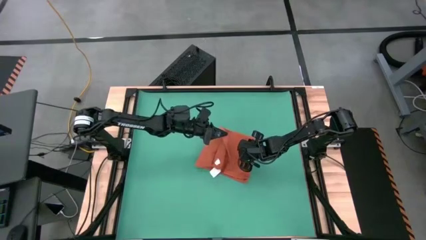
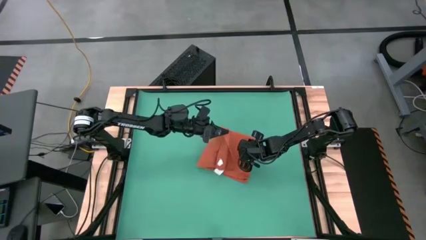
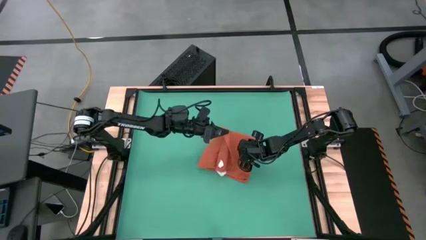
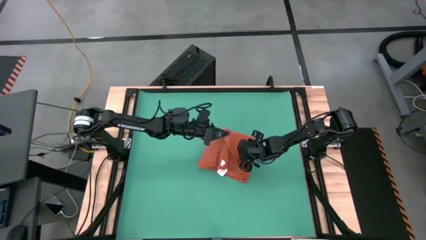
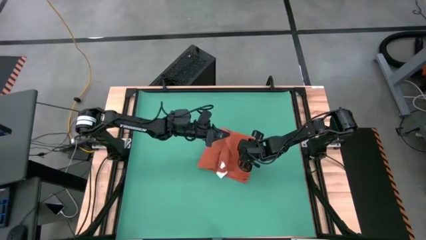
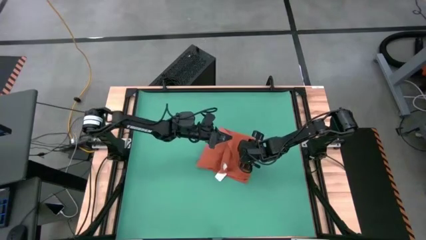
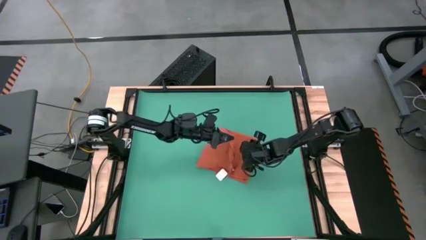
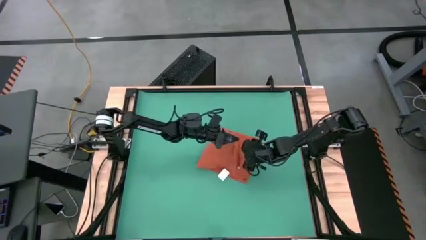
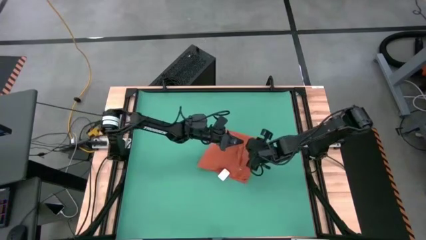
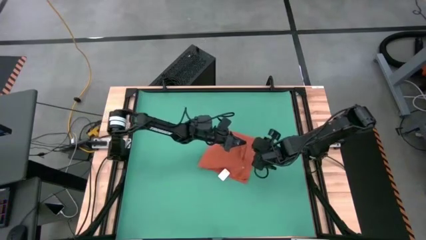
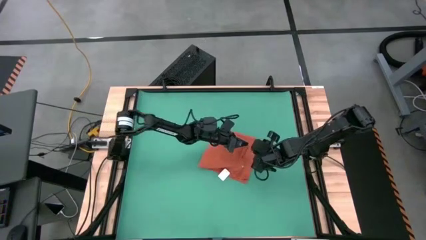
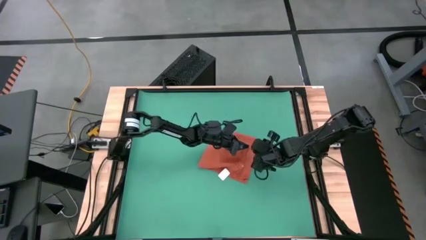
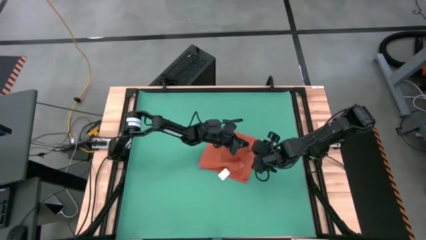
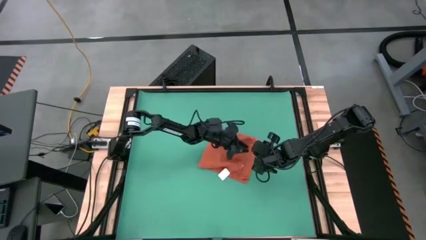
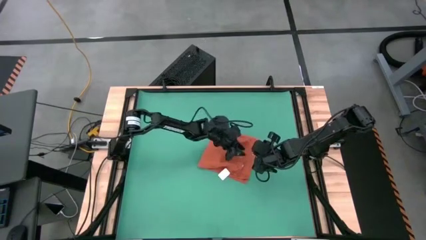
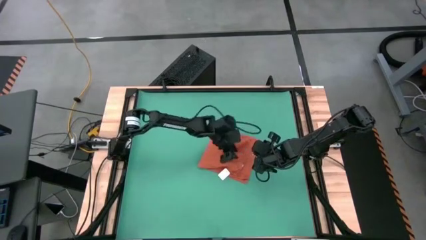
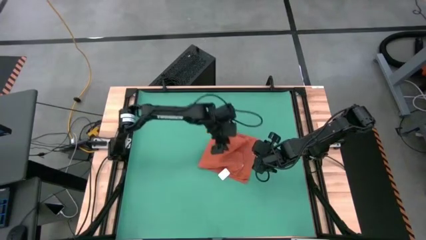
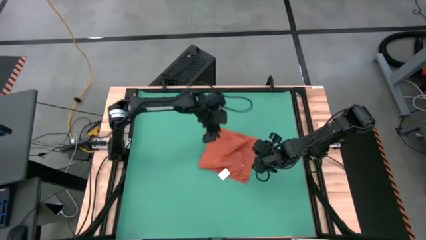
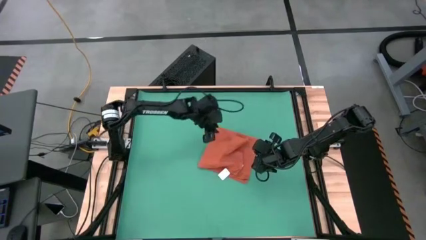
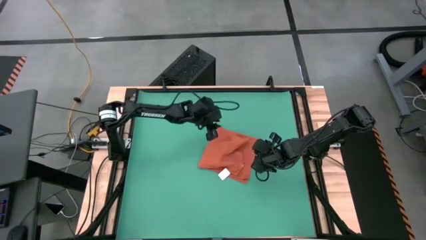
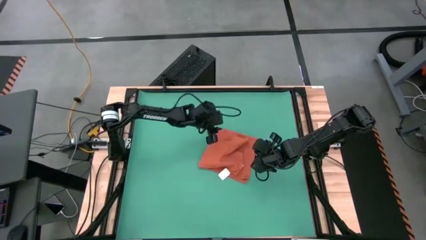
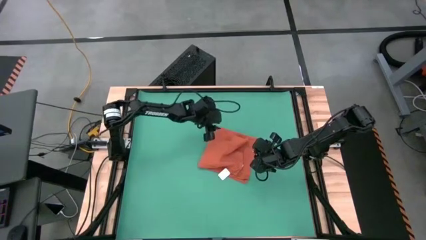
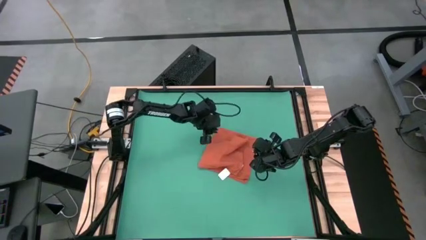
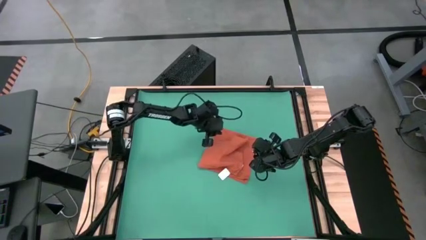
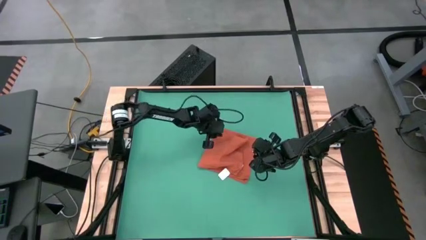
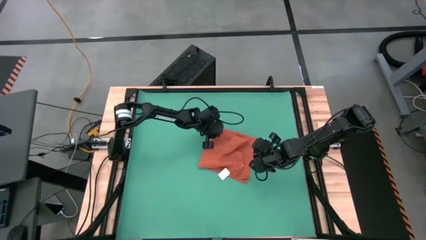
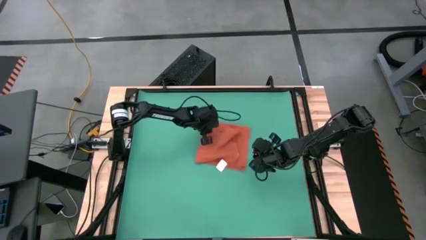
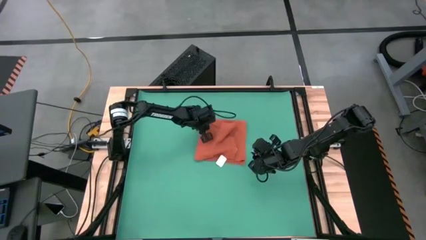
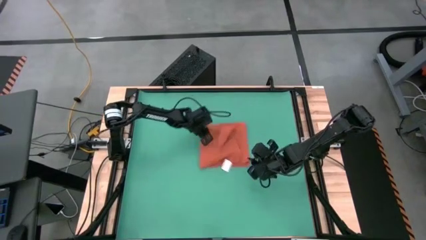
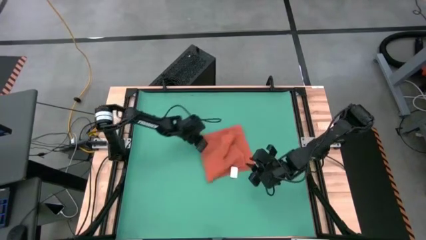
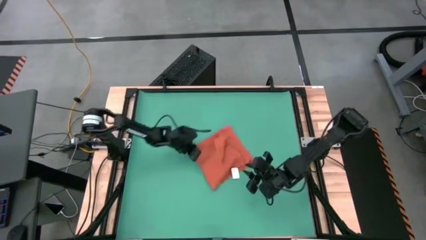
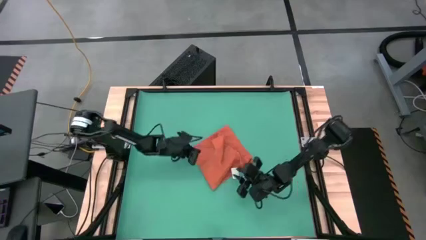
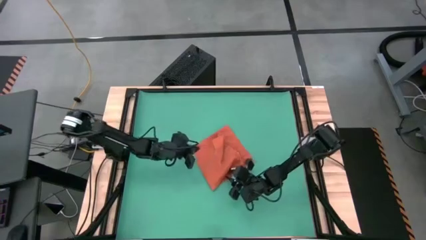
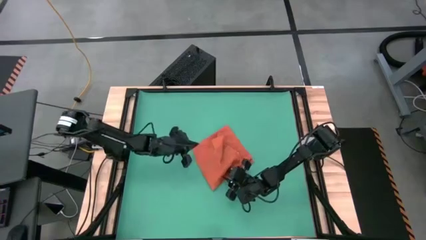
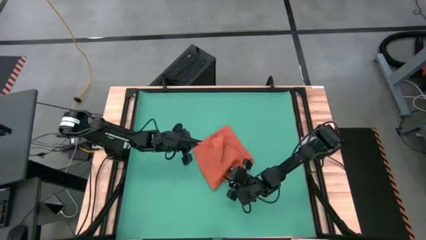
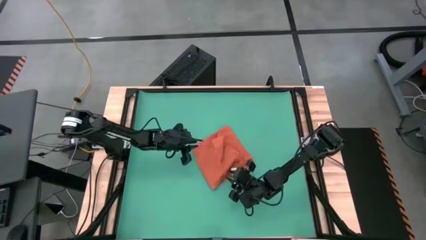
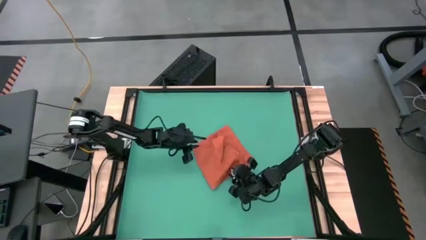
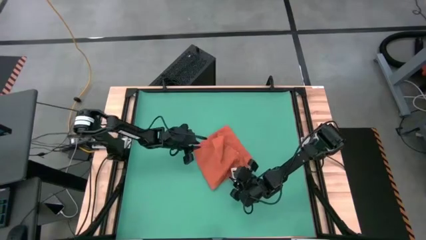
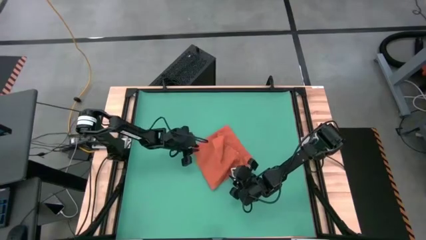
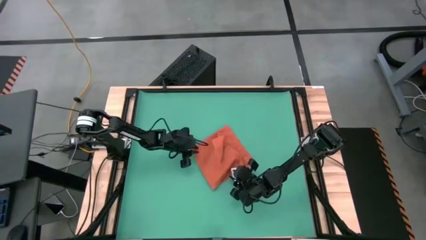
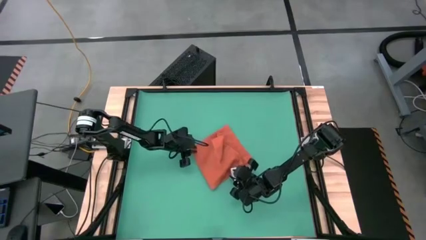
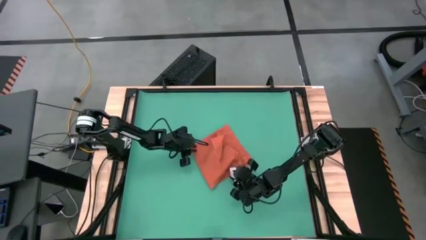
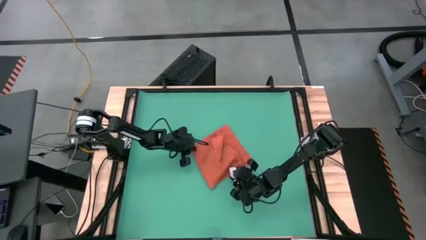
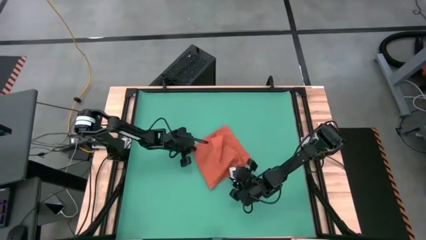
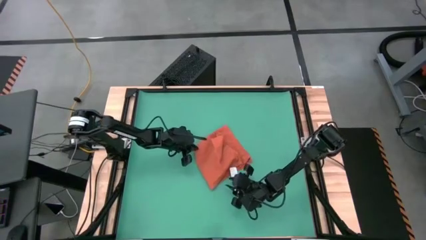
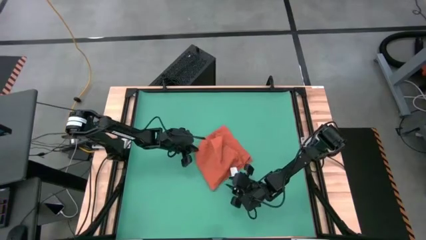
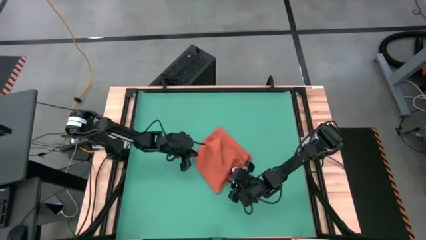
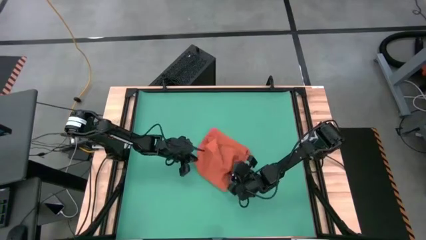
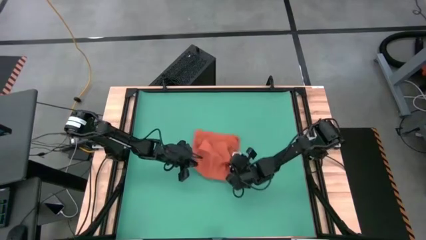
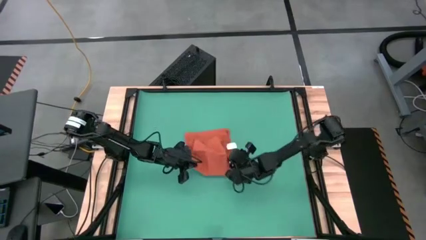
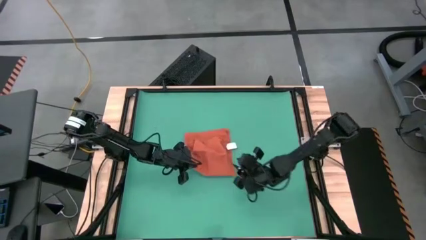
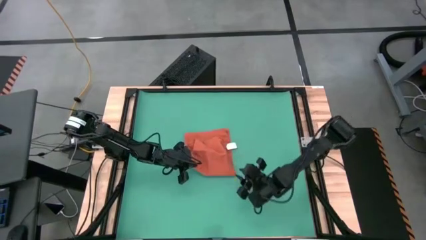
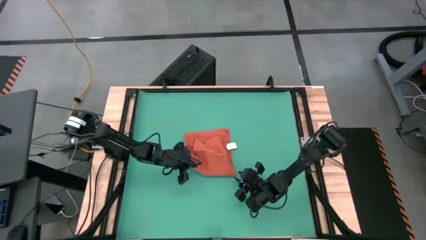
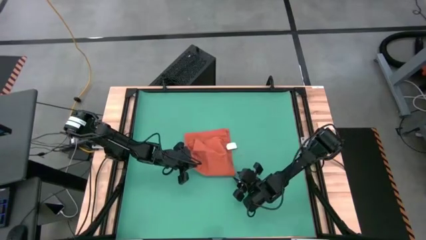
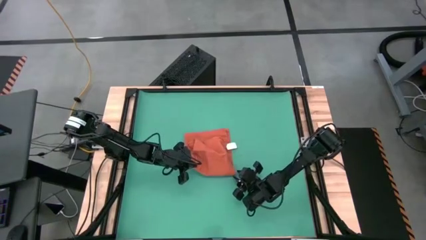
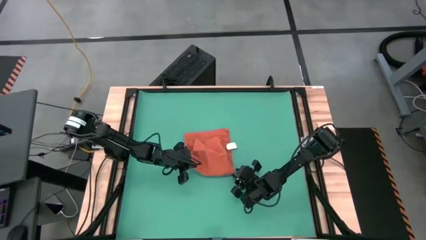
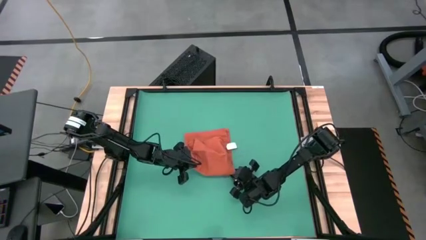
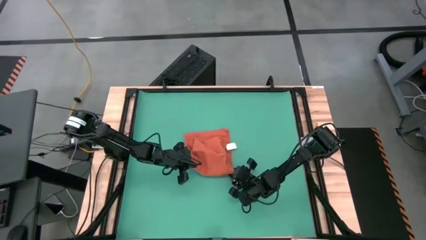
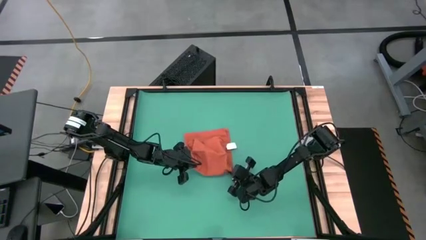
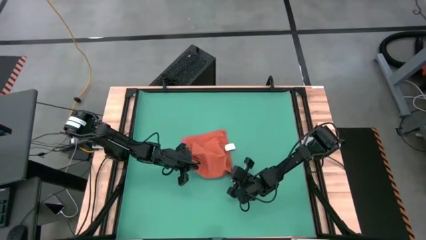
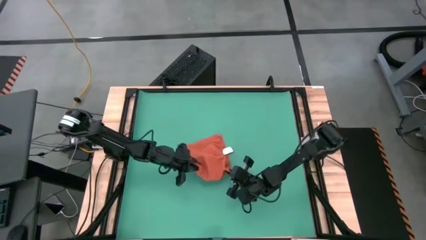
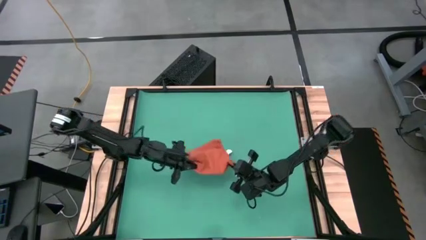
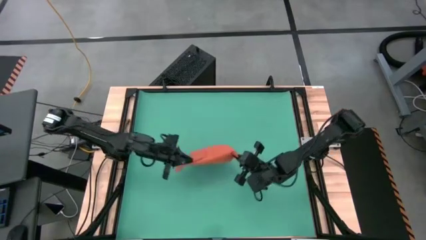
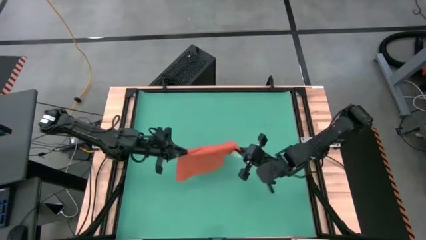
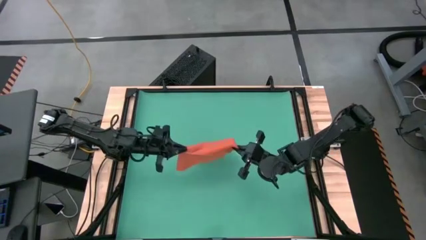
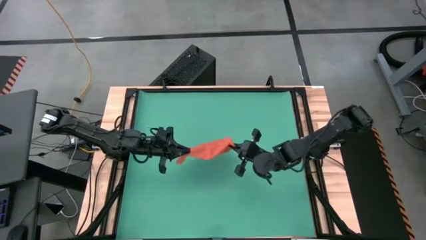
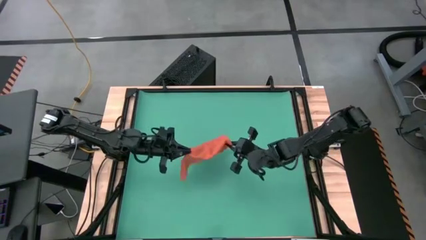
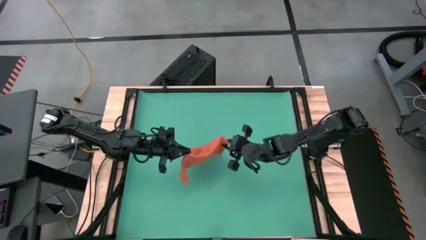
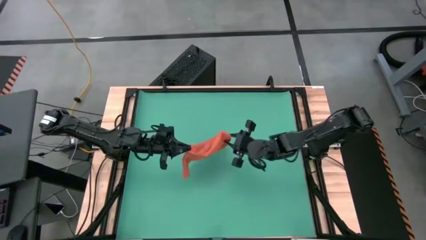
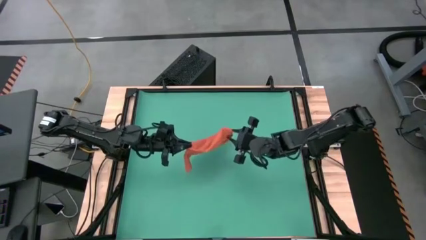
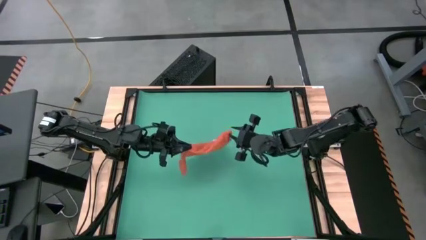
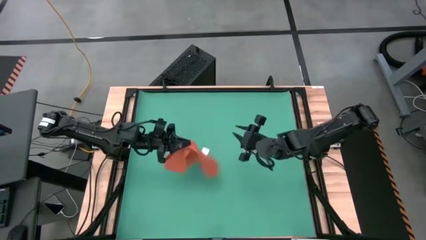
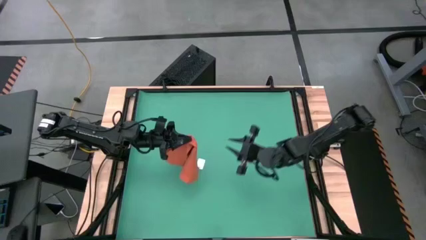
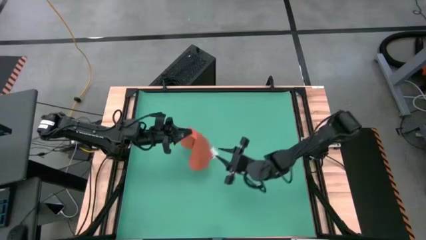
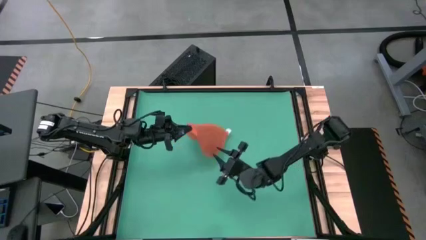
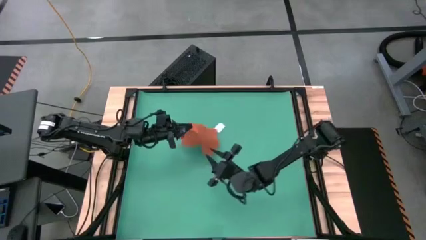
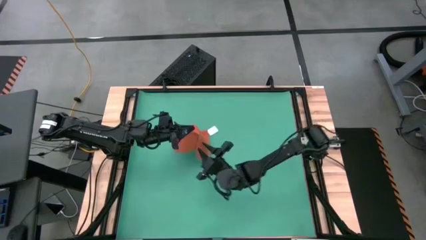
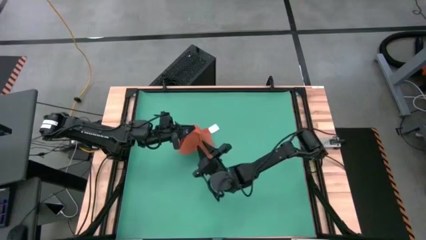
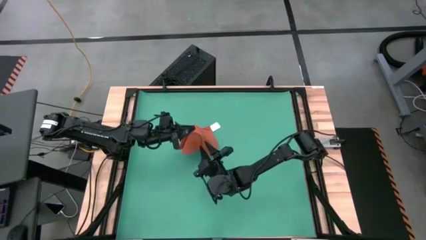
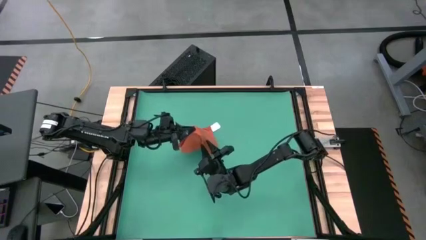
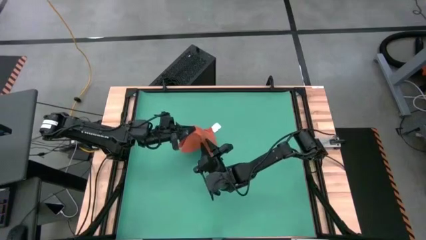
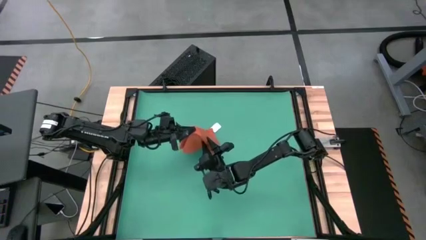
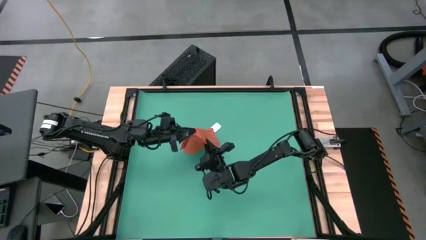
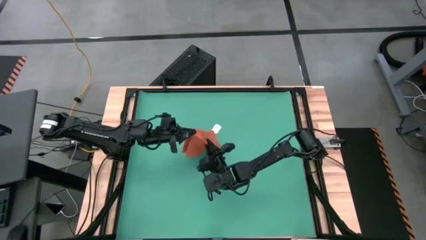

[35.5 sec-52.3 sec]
Task: Roll napkin
Fold the orange table napkin
